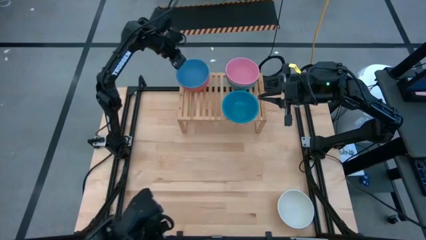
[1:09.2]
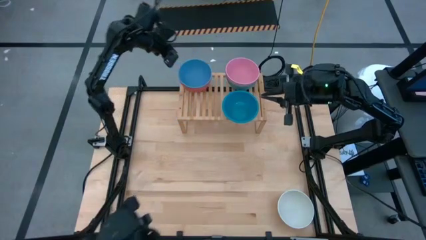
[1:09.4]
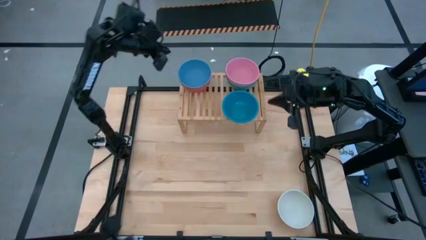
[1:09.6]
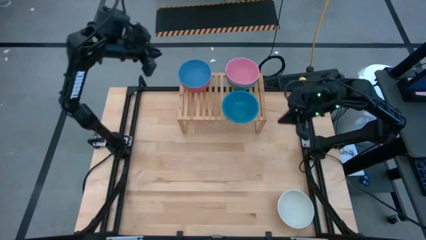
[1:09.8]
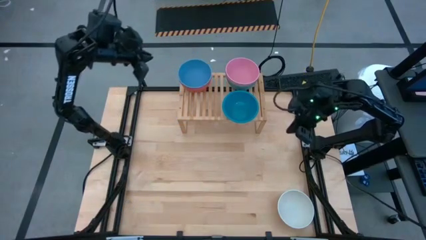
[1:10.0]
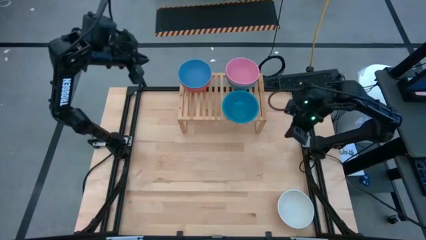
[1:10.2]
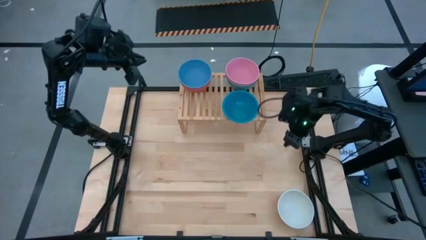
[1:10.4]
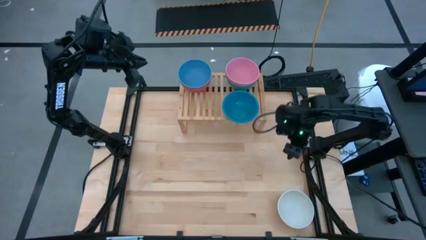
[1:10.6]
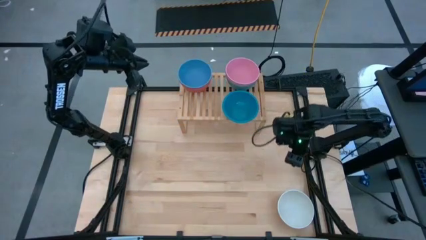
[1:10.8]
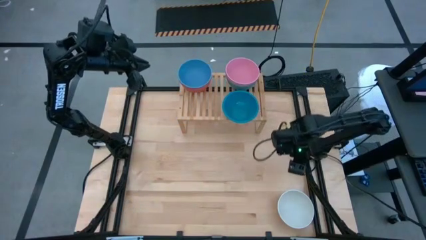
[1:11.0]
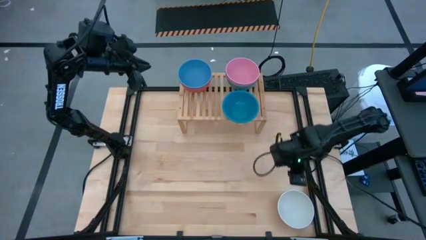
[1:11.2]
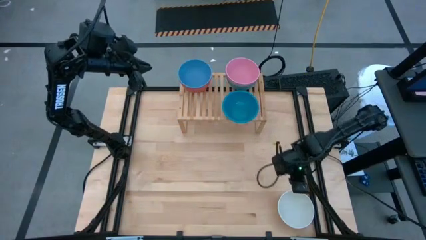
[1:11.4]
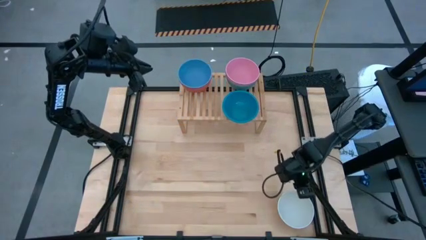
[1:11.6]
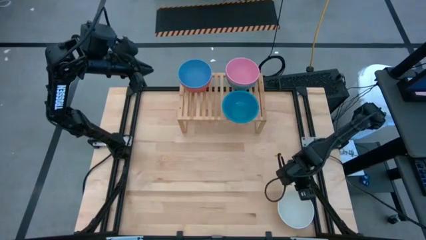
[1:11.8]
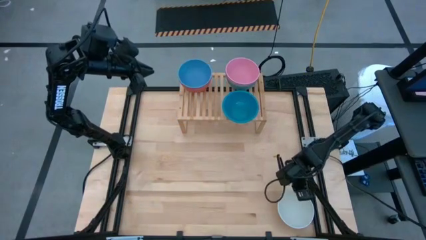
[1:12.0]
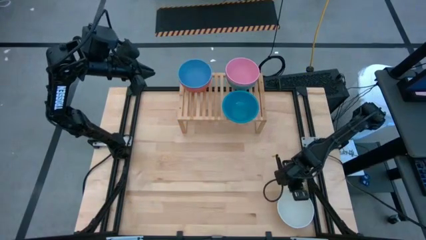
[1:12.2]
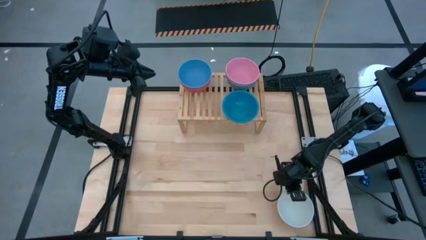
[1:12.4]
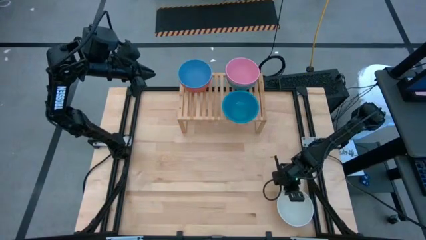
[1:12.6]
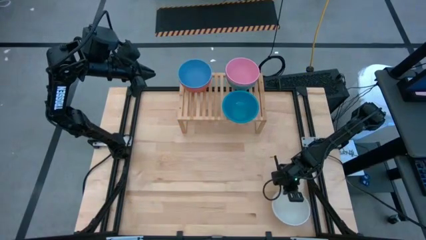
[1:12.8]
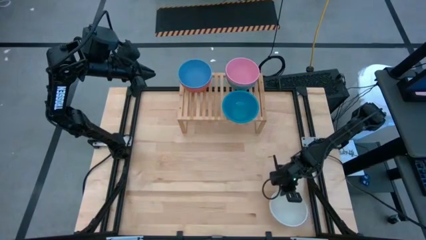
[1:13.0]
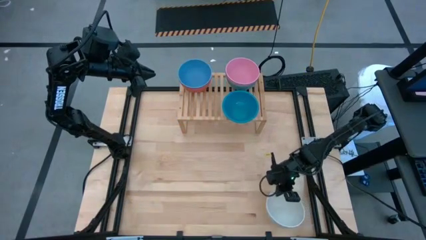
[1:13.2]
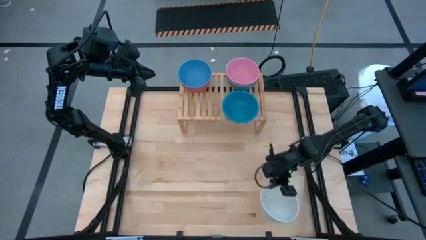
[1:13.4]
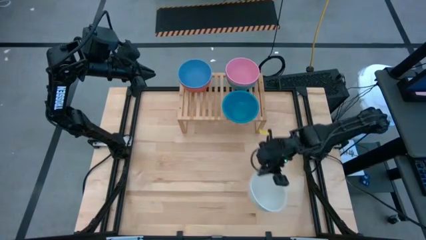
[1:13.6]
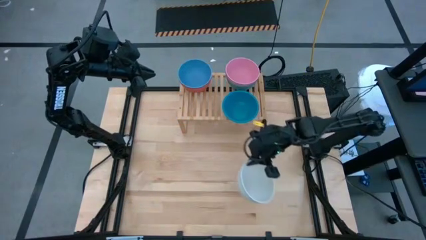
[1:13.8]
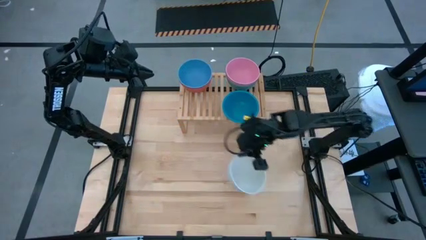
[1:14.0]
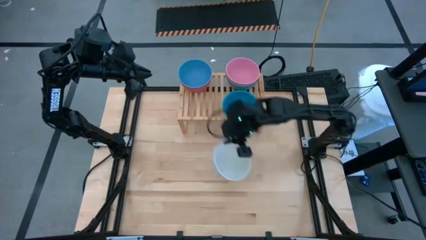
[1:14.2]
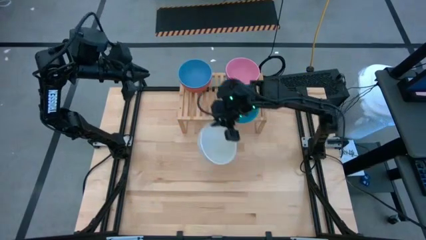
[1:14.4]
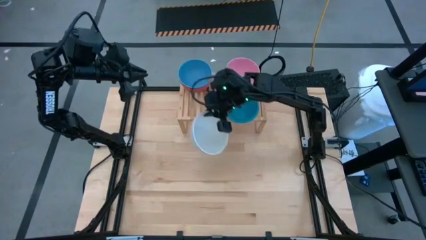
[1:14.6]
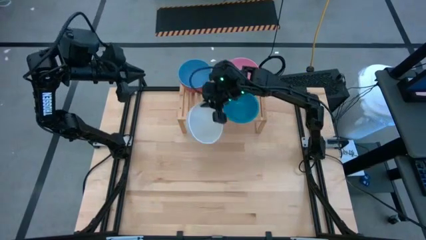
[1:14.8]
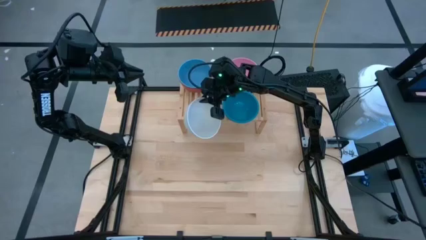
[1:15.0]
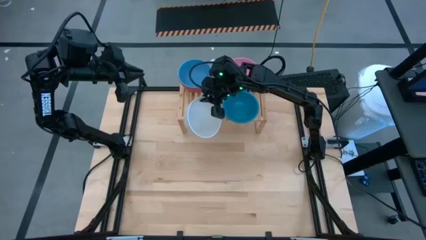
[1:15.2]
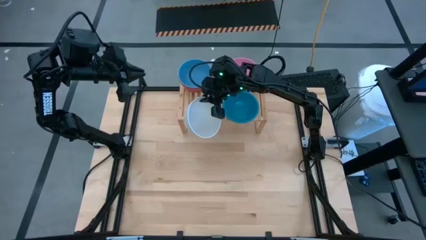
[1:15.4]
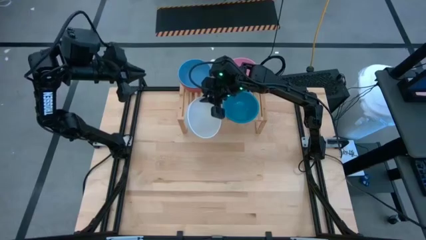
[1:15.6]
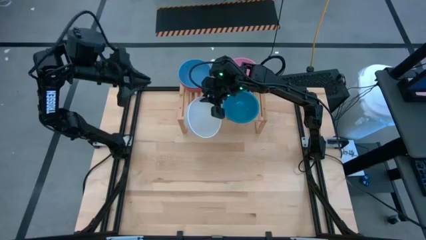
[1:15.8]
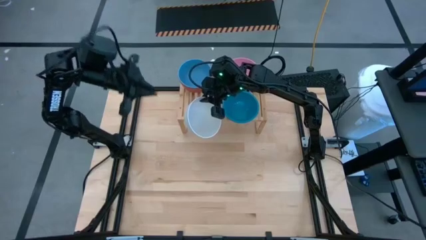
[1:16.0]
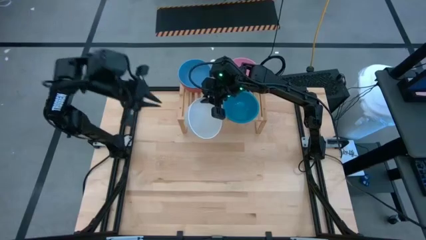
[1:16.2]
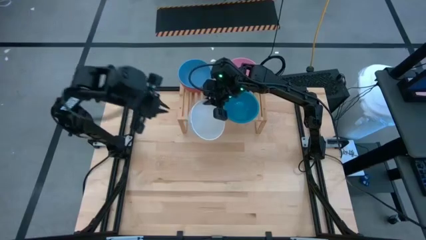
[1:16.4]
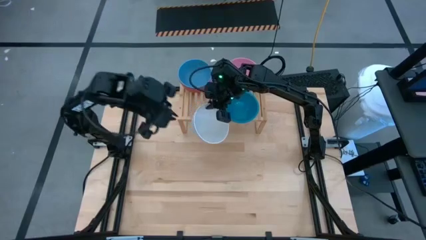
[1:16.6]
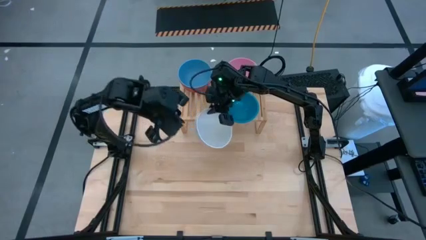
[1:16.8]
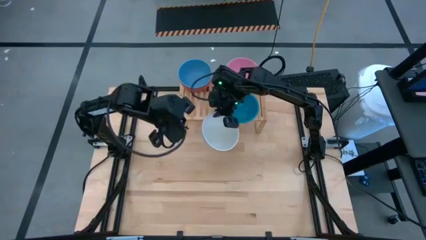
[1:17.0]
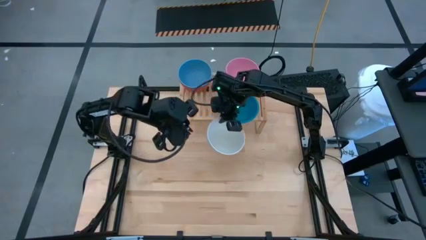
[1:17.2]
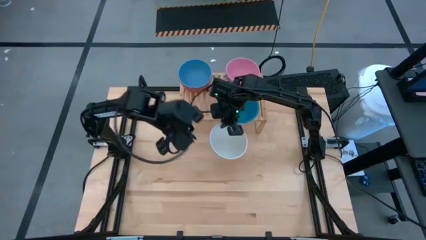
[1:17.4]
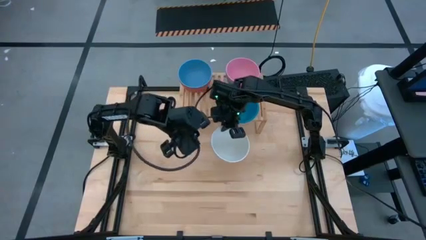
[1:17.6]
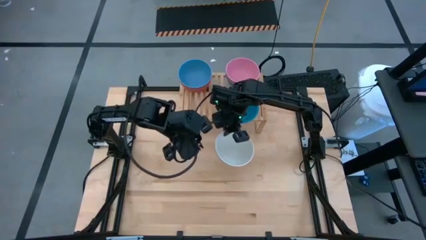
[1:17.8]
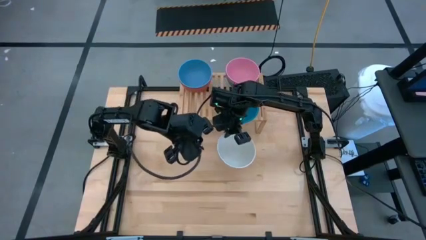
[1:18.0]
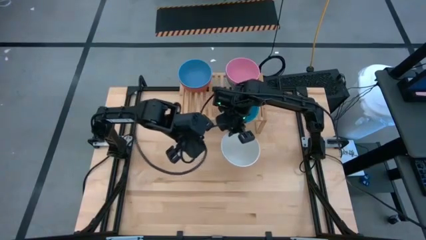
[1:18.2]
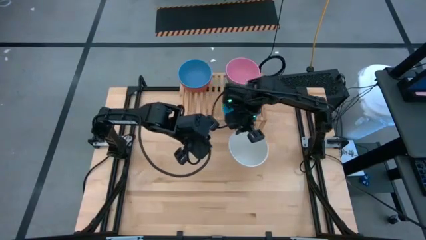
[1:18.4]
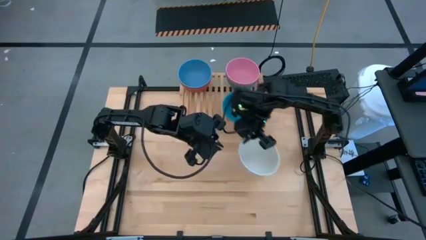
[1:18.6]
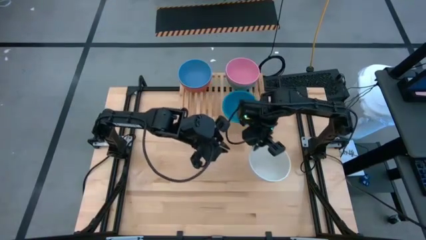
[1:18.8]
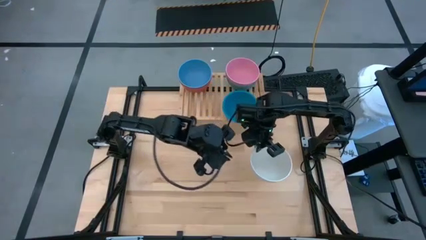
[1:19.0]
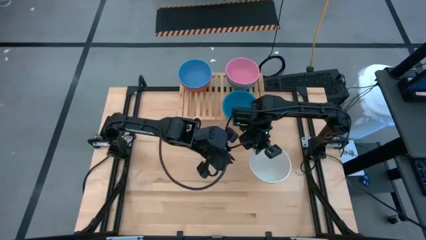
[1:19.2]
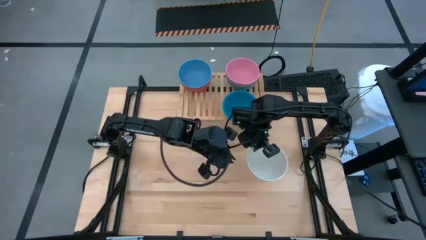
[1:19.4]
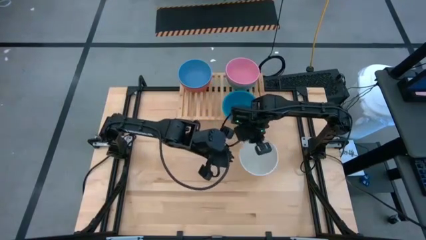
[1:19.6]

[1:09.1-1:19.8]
Task: Place and stack bowls onto a shelf
Put the white bowl on the shelf
